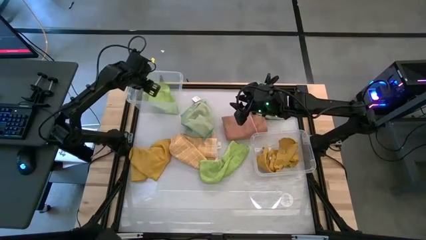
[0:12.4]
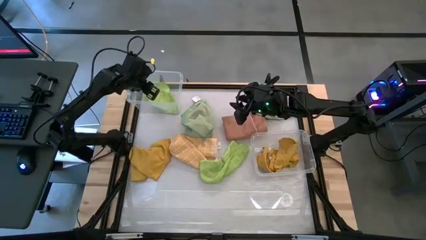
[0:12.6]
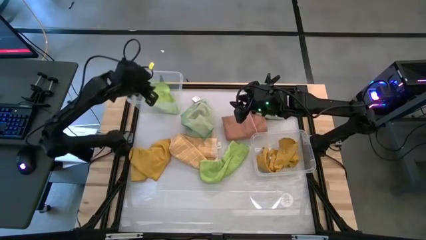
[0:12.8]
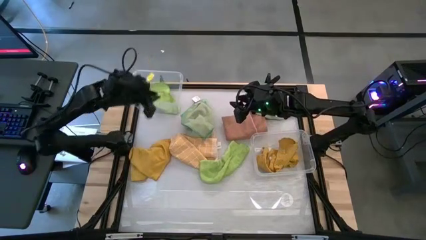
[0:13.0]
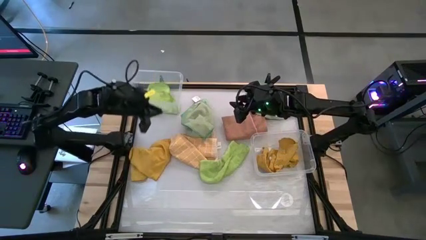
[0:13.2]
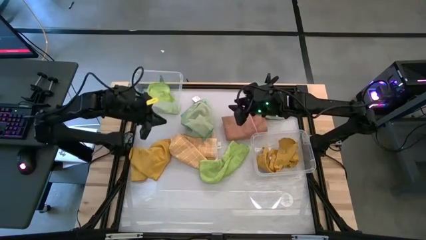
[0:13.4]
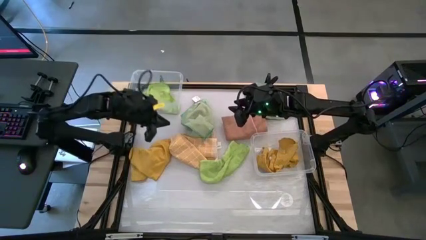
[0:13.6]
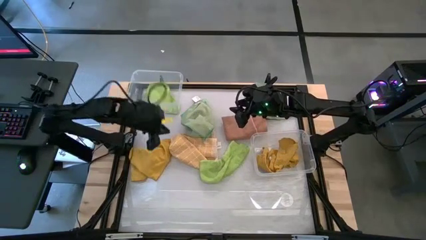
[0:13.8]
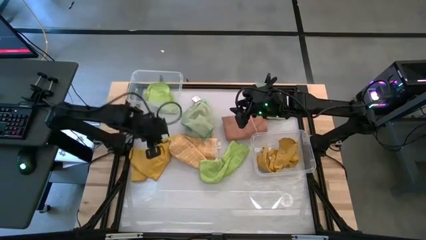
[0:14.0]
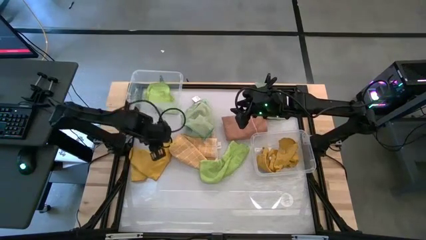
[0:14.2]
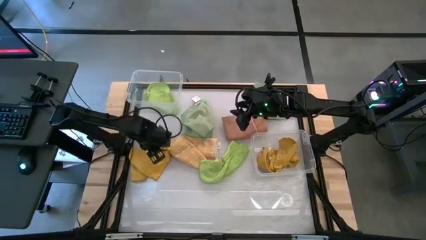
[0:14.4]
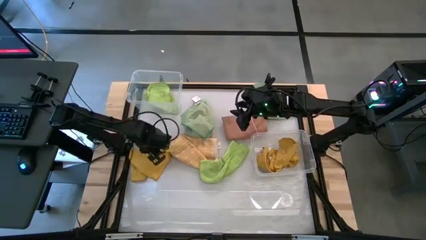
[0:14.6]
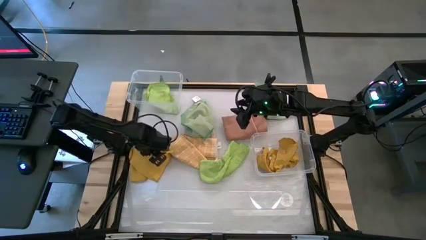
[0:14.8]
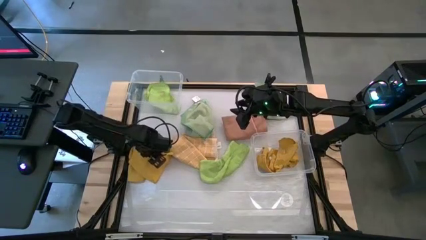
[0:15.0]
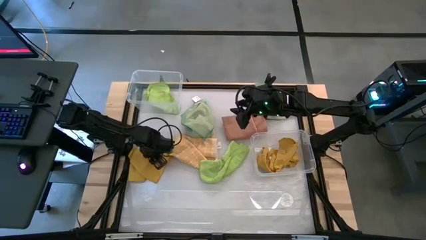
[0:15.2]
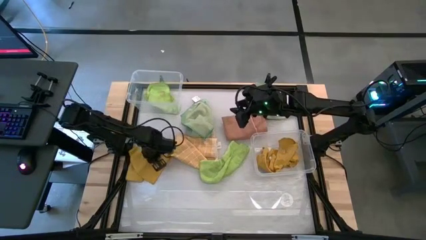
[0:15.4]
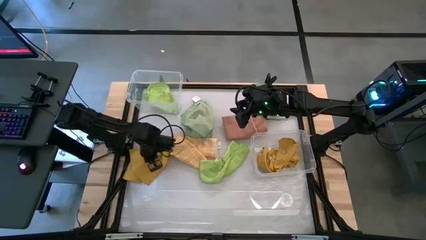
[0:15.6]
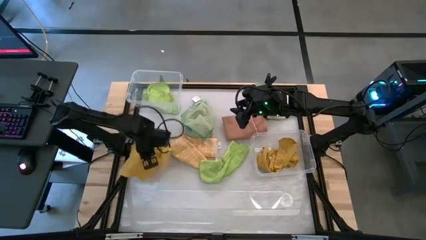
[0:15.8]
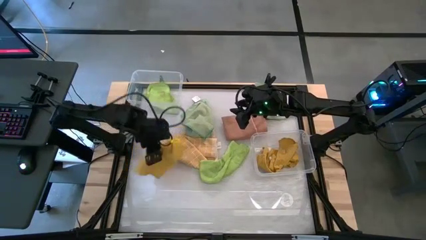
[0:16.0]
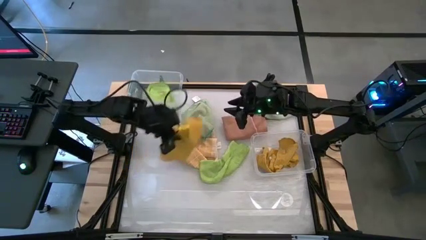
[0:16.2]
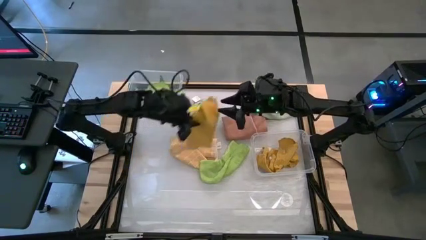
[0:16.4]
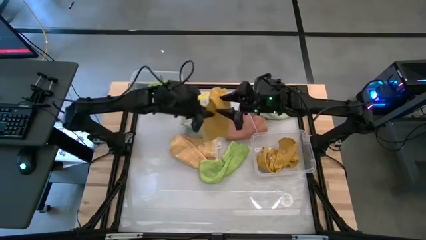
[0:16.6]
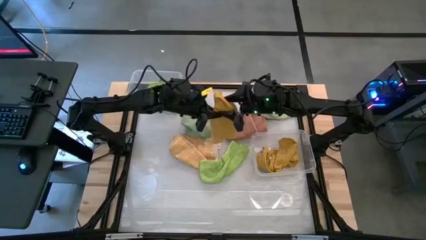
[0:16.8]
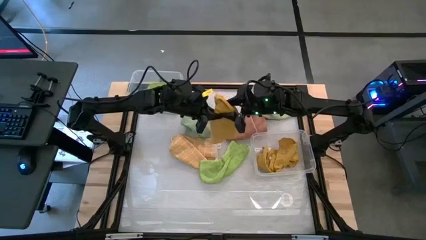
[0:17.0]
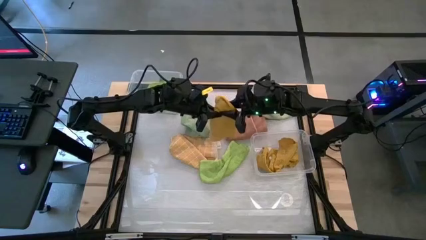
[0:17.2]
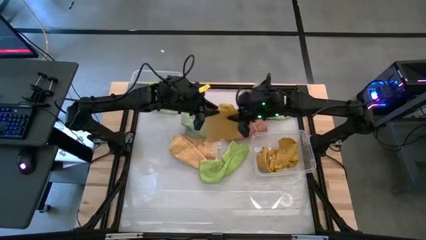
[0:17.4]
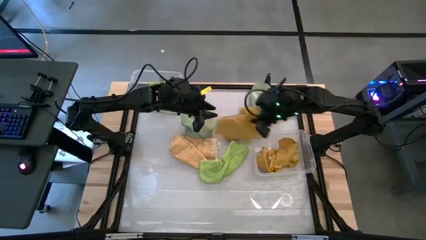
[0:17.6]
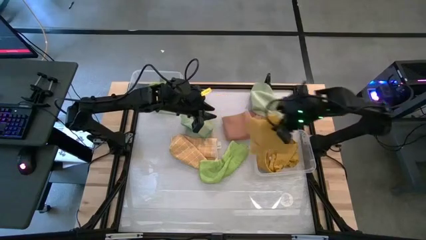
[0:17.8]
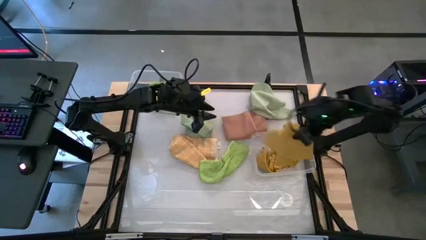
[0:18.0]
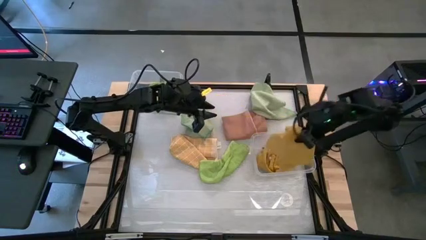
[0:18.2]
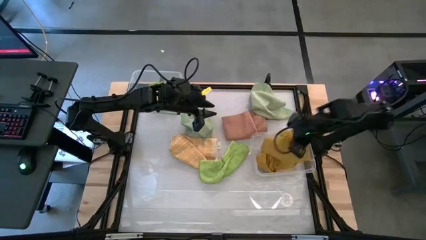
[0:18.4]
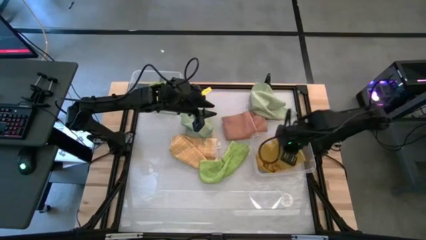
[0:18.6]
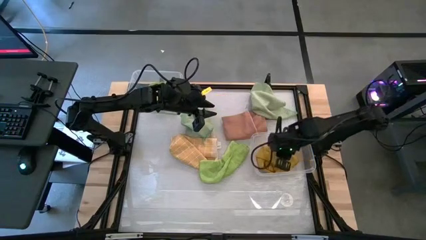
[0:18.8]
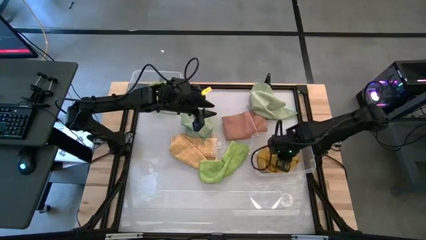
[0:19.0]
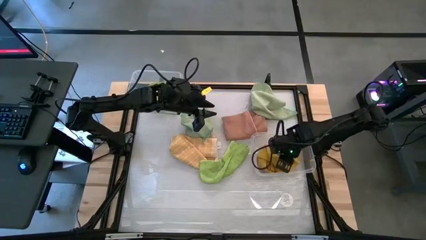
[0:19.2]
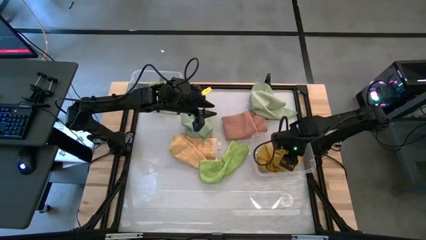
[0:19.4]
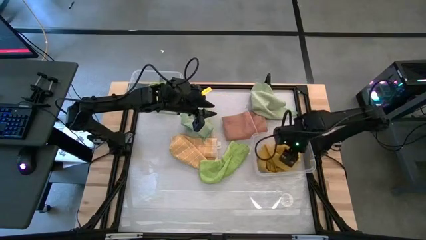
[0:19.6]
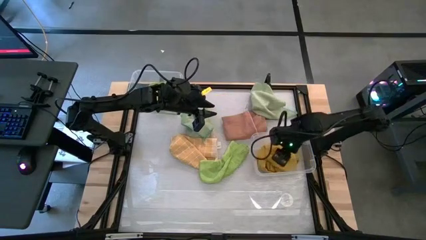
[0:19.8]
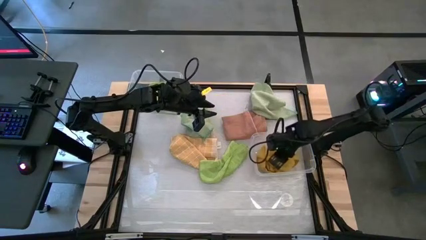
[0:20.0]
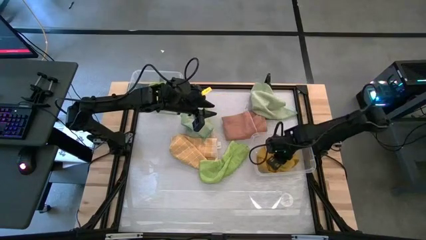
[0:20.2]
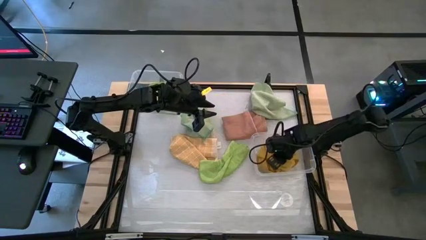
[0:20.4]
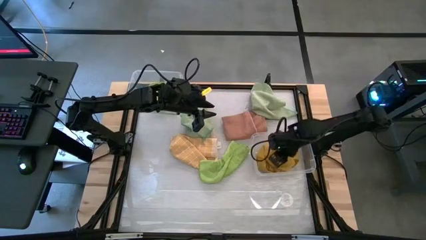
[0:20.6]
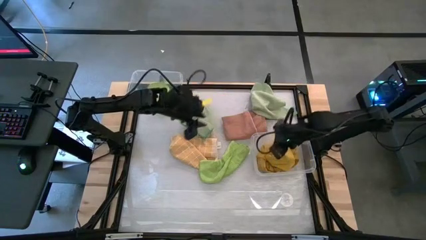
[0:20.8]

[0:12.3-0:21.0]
Task: Sort towels by color in basket
Put the yellow towel into the right transparent bin

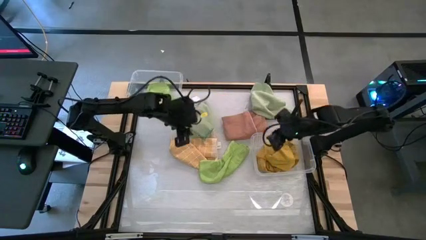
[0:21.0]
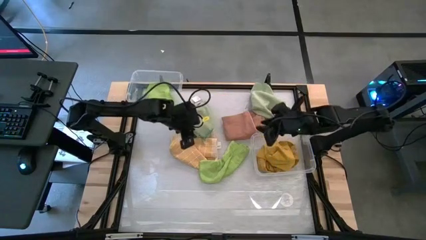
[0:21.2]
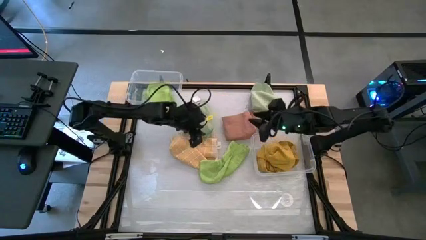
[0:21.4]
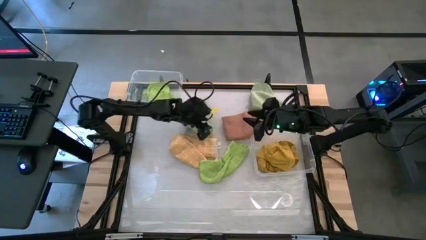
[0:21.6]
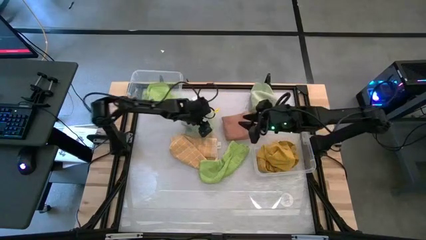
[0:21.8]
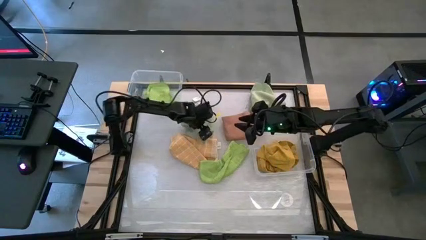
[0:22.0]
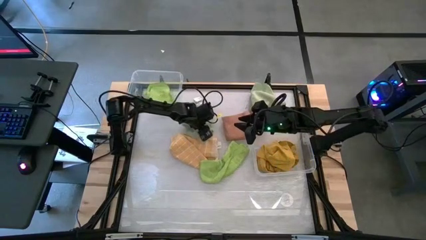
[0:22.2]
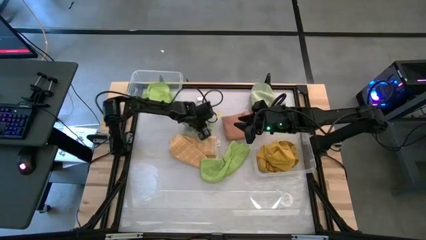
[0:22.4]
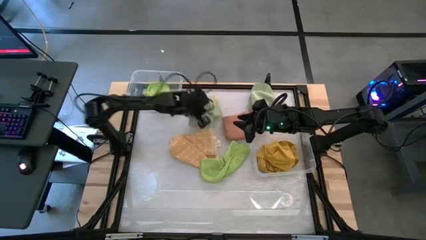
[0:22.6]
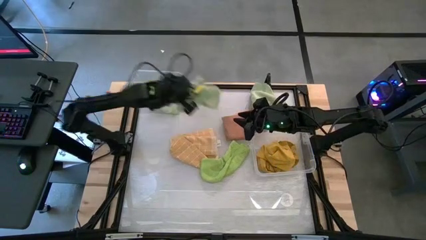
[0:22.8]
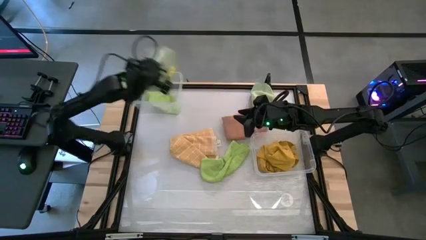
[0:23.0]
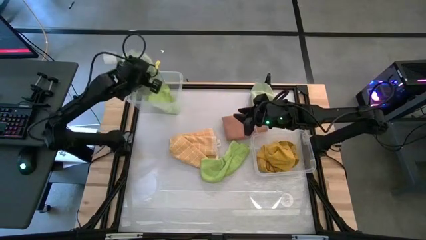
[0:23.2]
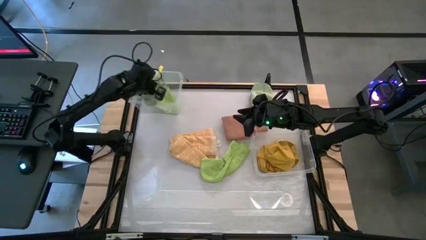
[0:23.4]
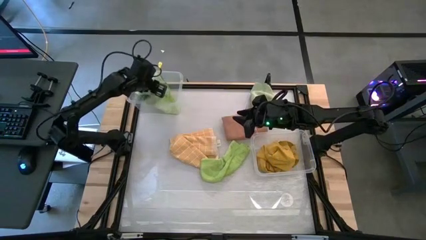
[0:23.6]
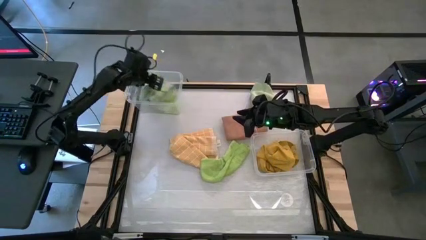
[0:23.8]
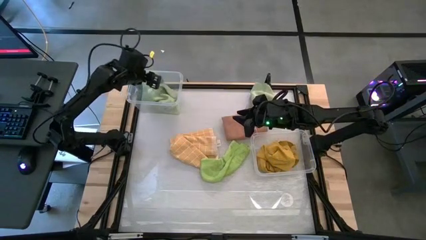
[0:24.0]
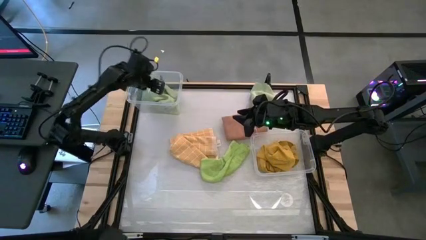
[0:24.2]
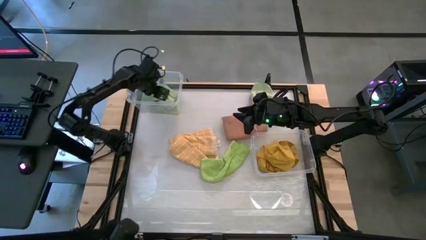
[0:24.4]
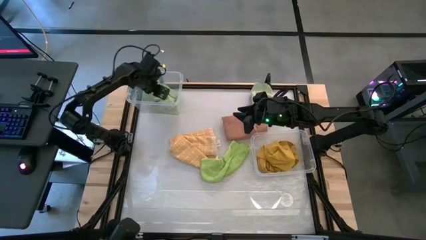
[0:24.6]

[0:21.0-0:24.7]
Put the left light green towel into the left transparent bin

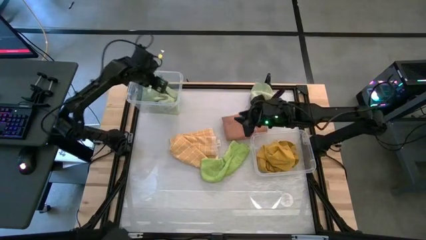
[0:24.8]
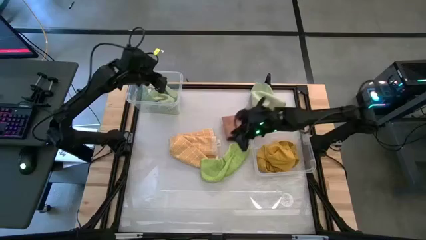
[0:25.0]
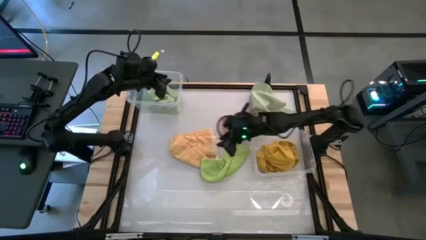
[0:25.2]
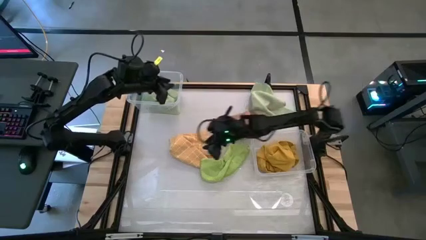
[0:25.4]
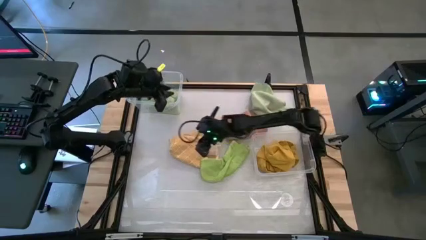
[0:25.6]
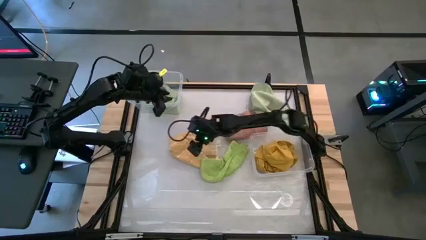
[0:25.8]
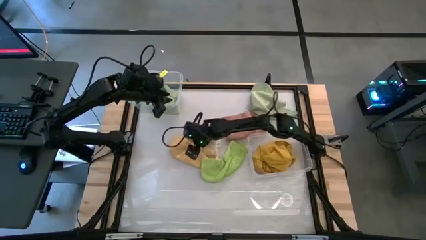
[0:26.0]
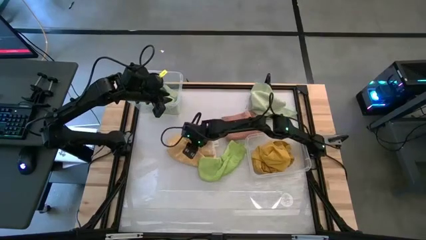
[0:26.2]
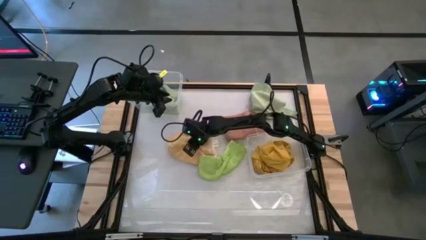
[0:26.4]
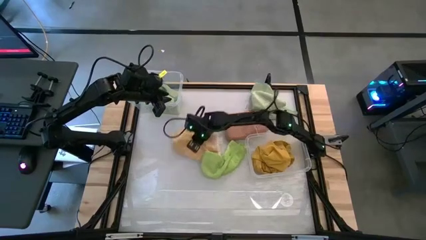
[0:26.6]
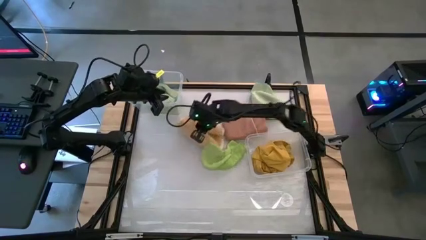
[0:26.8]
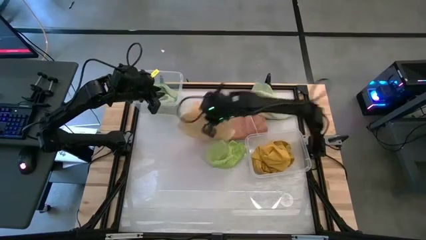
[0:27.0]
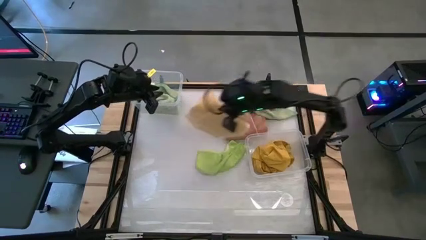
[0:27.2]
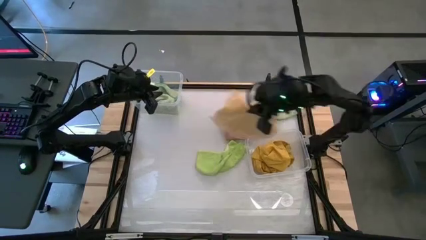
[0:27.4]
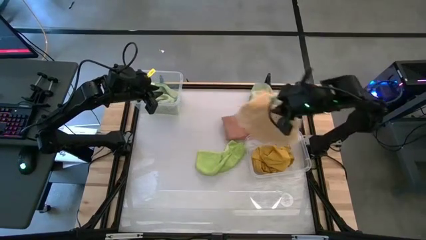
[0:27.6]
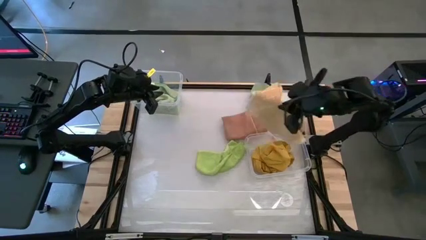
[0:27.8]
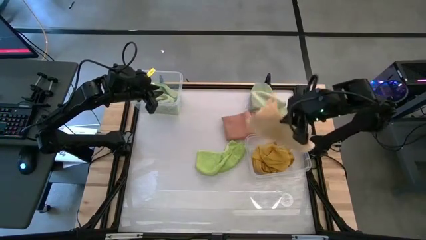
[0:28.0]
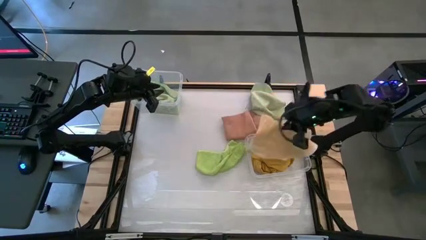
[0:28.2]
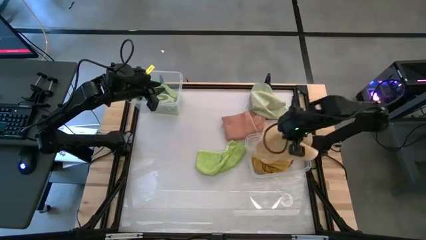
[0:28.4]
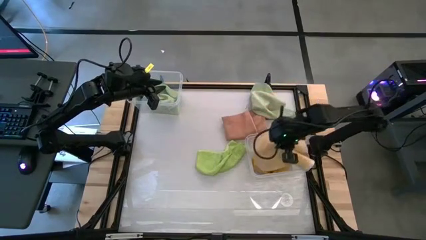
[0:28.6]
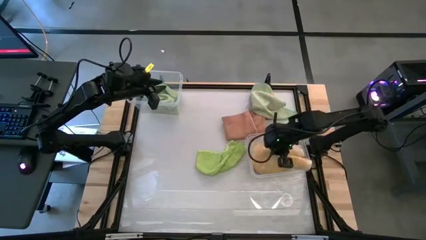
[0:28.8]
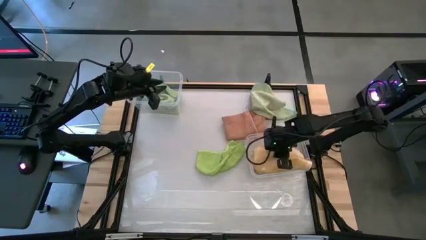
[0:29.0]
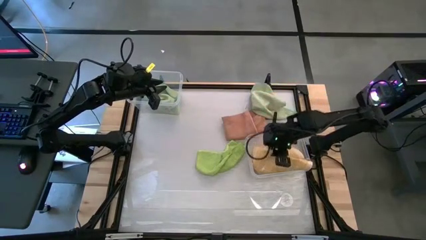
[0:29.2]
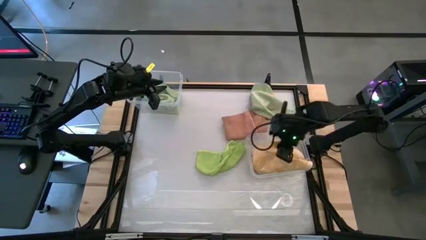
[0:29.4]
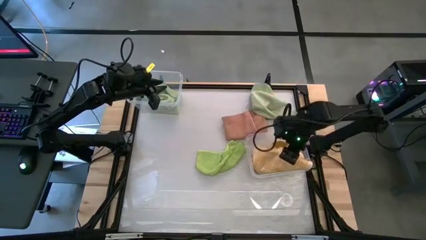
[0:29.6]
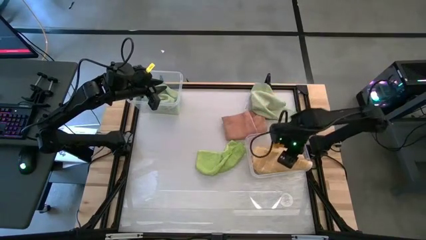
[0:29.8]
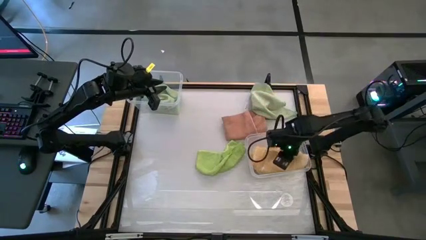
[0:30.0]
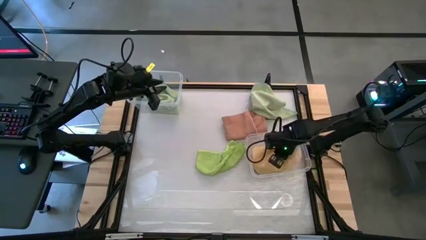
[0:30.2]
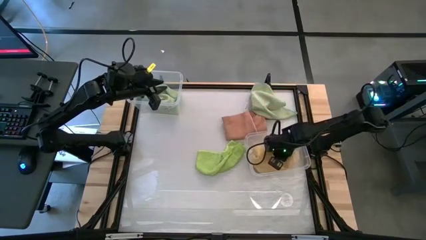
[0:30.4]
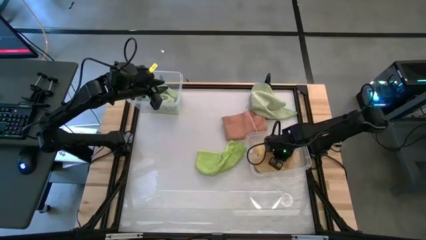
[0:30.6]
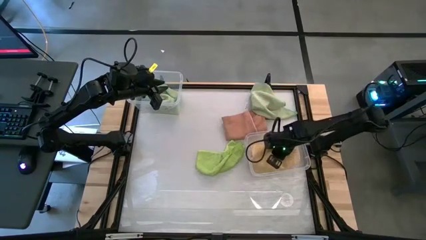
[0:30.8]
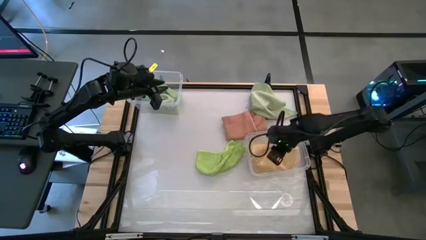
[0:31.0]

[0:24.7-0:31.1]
Put the yellow patterned towel into the right transparent bin
